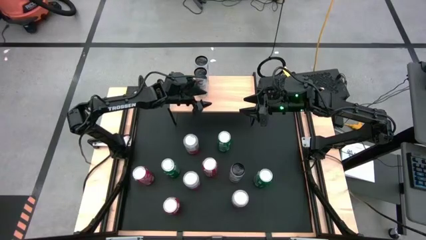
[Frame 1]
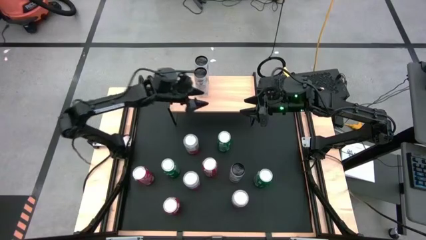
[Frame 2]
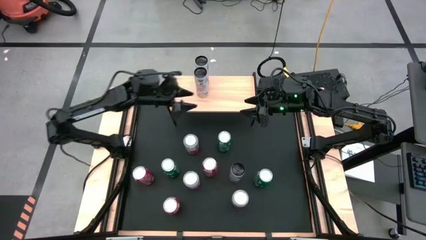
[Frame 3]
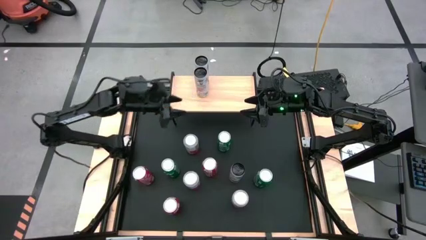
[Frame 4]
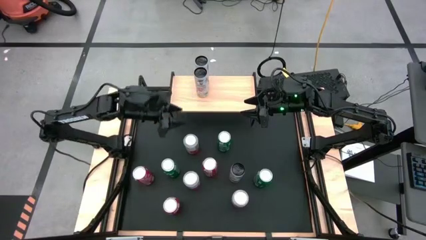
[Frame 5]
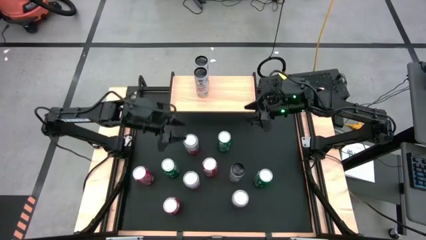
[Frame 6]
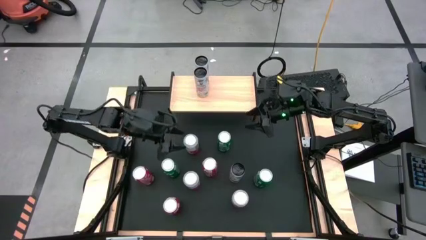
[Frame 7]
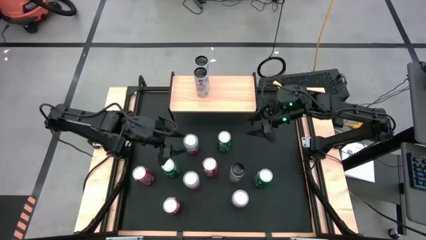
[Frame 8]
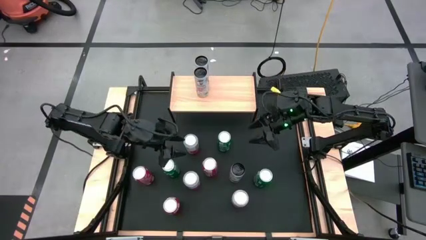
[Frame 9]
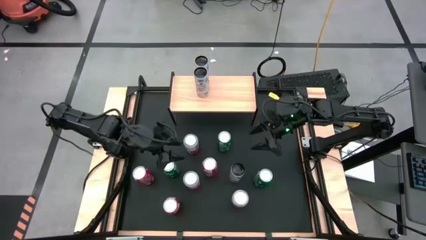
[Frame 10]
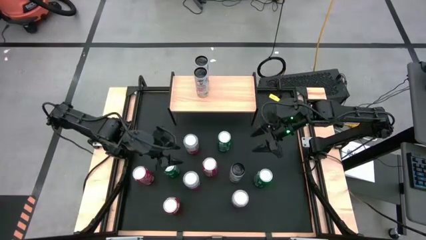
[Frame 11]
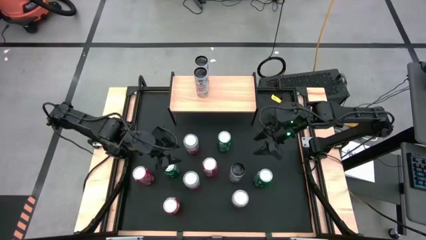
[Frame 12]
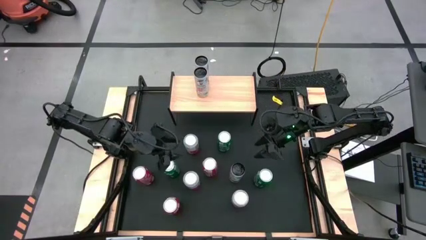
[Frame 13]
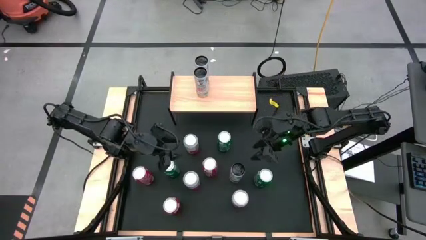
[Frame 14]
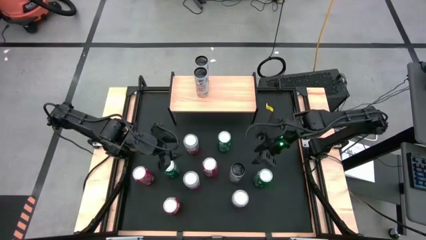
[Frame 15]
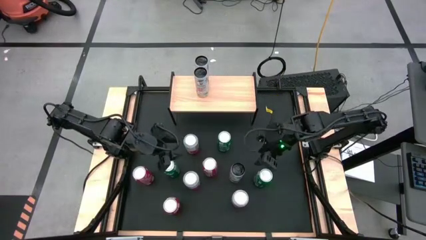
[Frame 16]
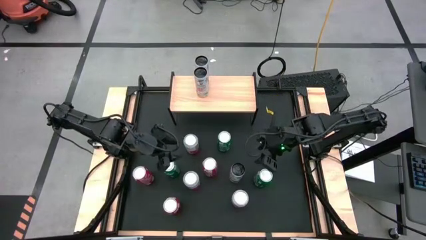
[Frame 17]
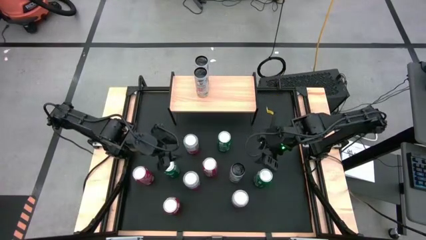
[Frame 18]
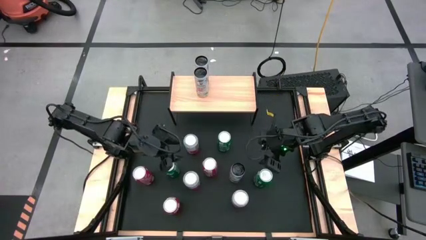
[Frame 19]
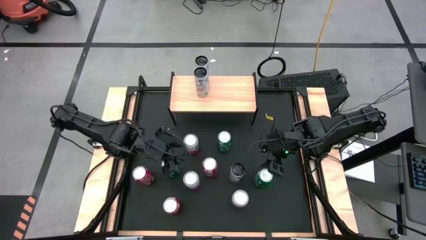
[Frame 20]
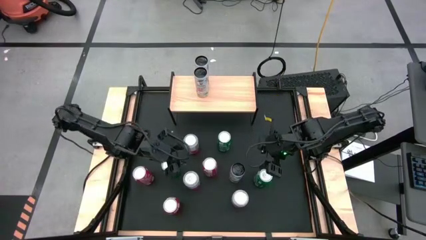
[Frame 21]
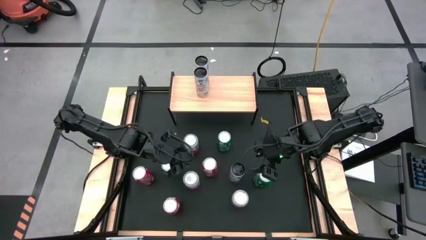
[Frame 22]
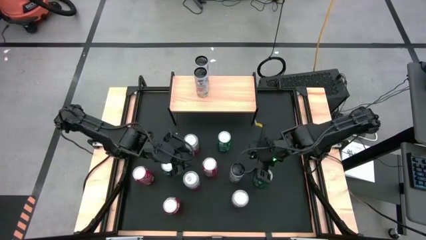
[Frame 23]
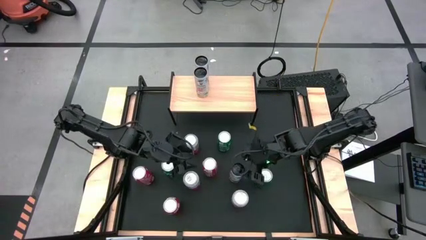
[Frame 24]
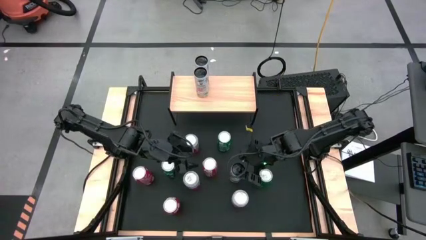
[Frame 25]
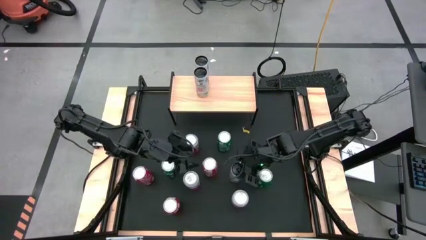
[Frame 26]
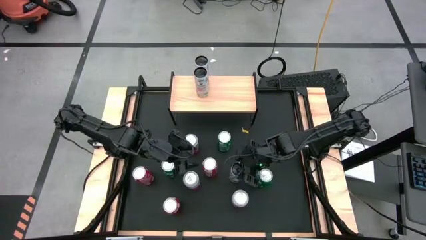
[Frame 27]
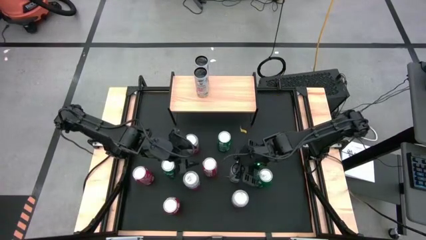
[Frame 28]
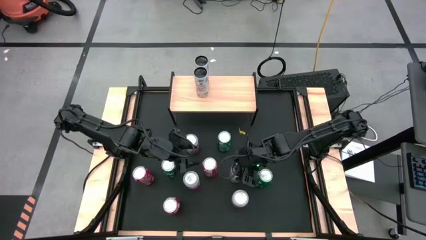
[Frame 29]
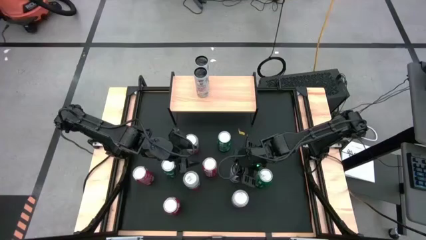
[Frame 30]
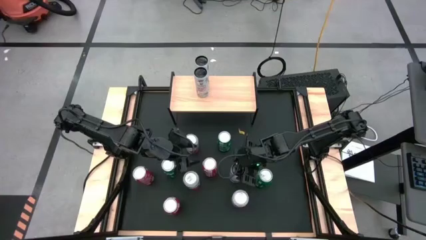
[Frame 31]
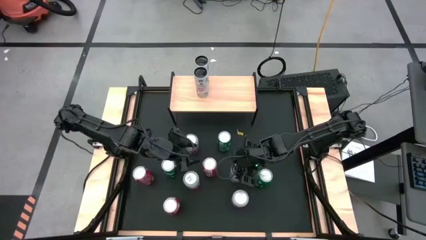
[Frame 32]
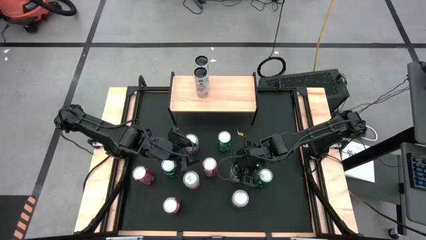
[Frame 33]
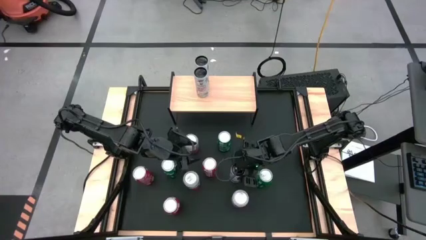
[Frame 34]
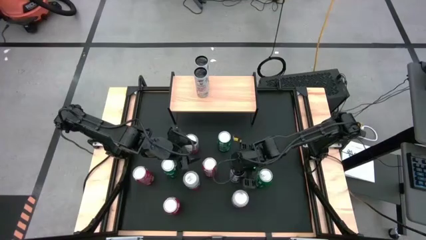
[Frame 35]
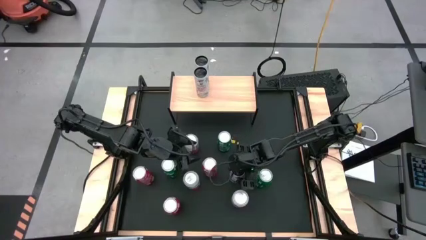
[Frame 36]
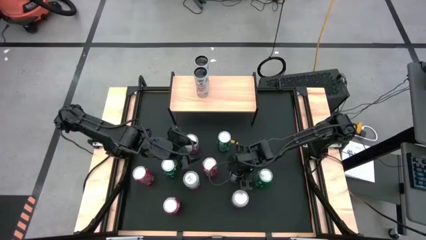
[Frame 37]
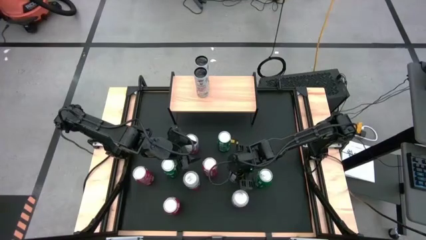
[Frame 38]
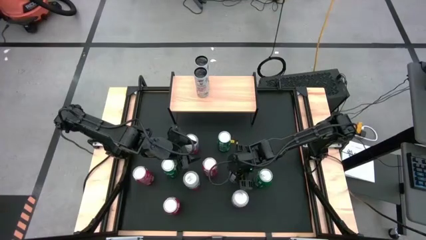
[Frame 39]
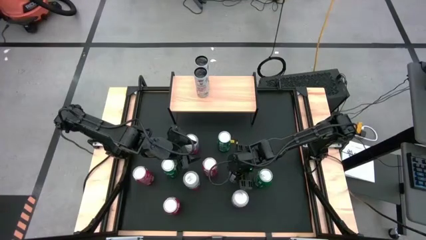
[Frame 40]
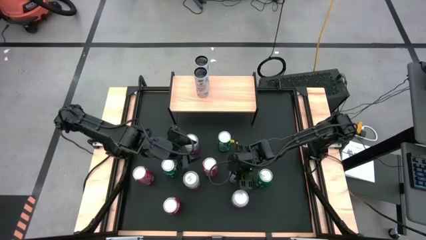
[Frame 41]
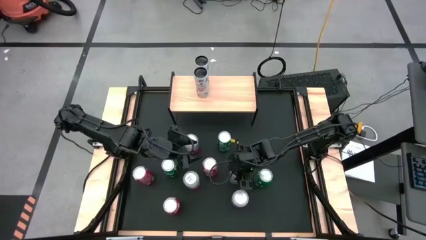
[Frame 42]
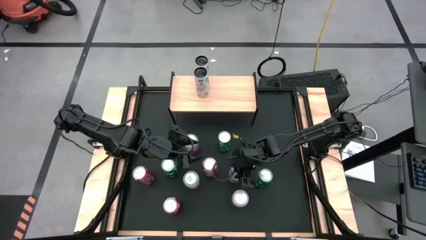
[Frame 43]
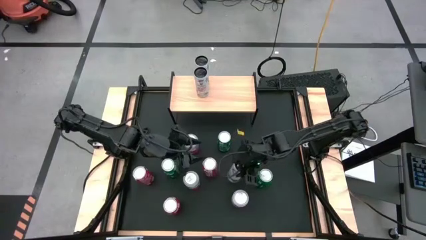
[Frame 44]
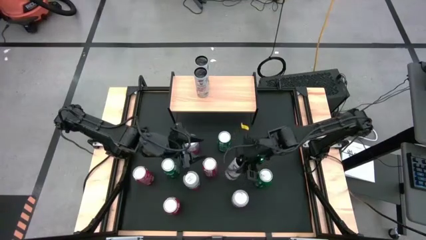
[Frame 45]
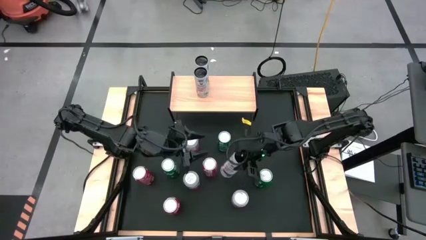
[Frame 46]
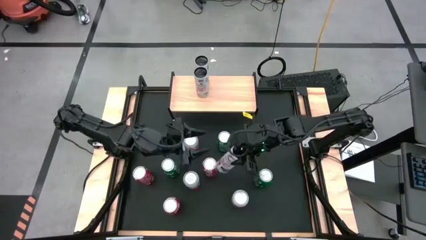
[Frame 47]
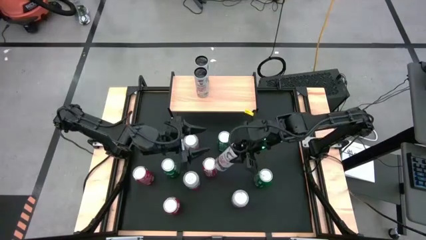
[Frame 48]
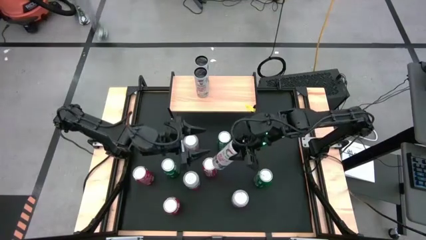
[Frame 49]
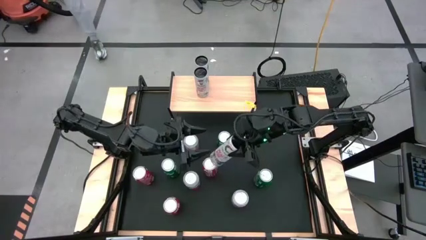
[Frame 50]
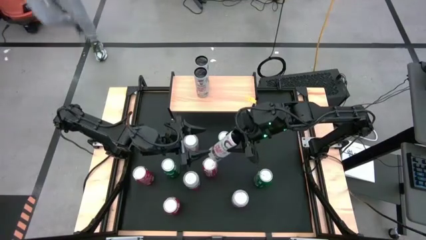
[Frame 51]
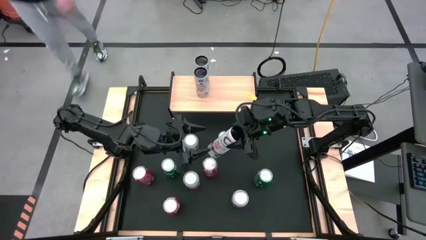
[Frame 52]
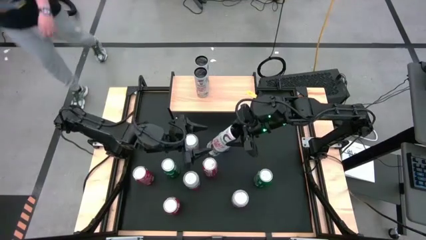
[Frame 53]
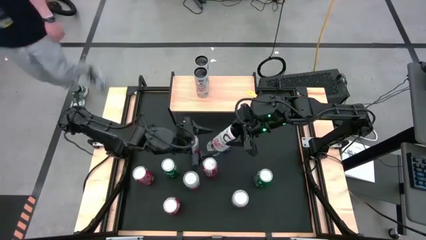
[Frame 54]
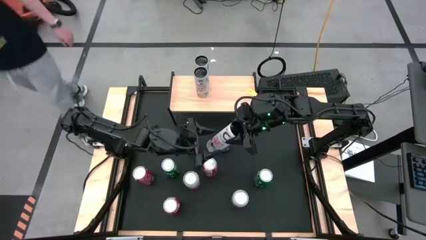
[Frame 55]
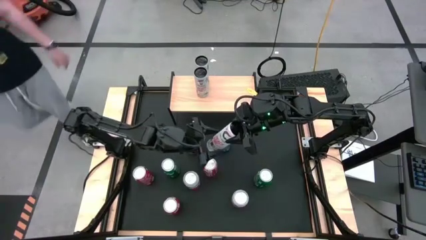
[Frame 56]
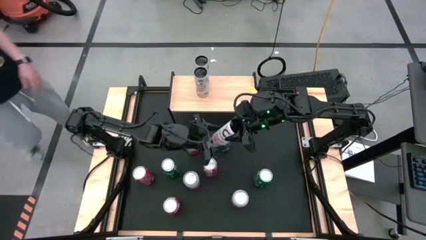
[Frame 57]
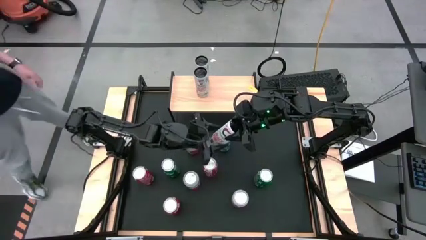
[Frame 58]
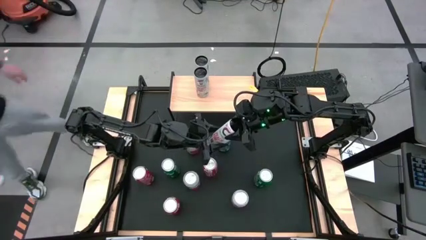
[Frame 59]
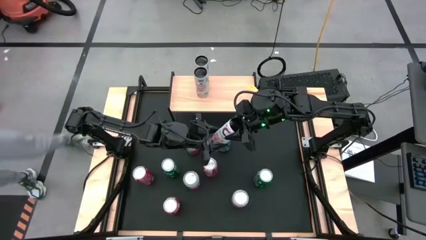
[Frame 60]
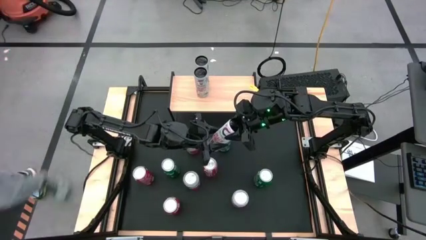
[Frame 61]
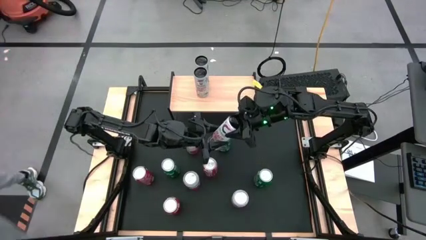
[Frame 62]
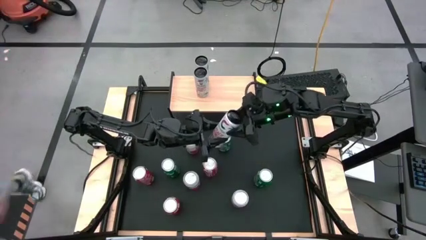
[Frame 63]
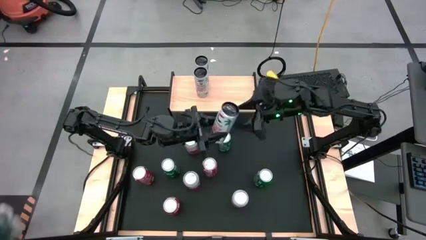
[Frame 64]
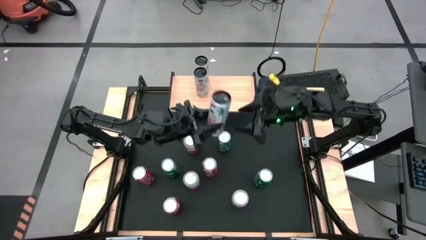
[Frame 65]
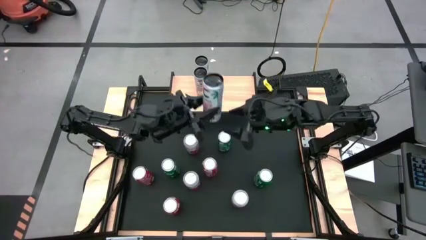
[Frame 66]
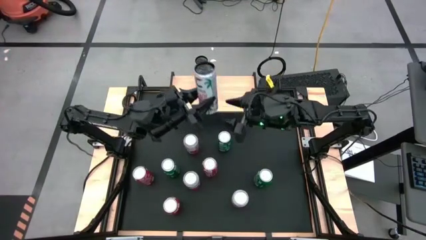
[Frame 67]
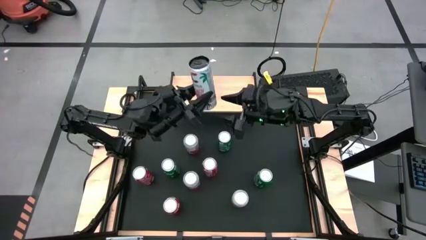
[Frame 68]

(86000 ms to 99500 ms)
Task: Place canned beverage on shelf
Put the white pink soda can aligned with the other white pink soda can on the shelf
